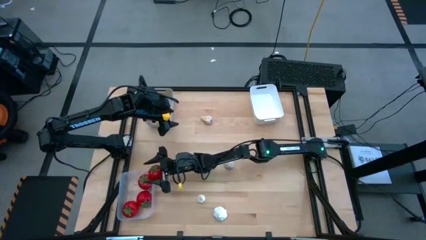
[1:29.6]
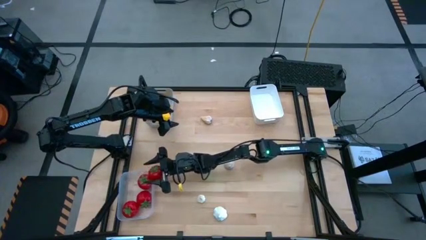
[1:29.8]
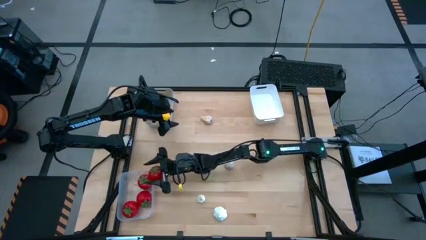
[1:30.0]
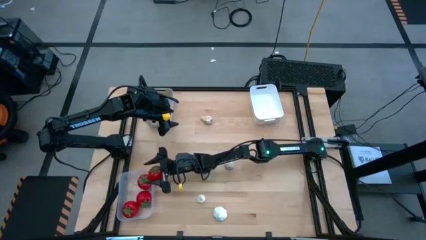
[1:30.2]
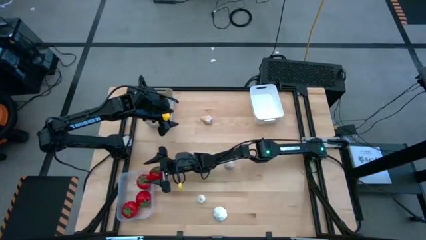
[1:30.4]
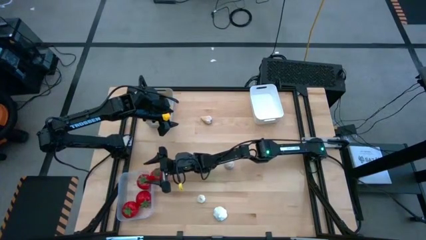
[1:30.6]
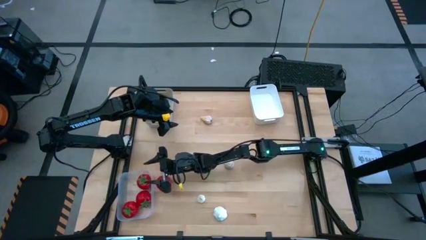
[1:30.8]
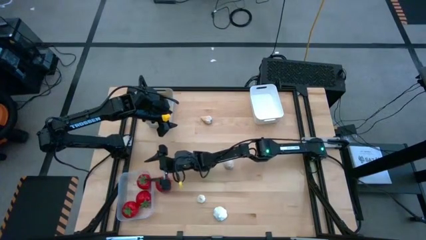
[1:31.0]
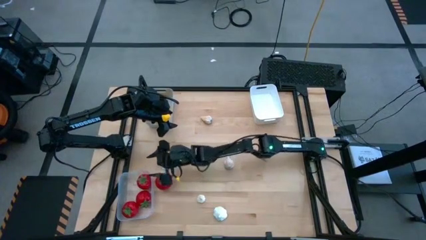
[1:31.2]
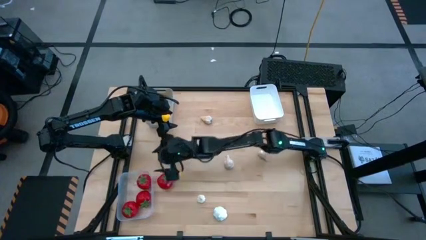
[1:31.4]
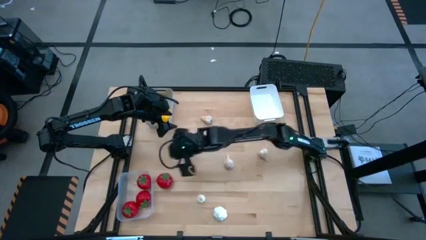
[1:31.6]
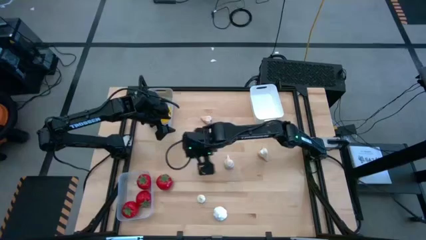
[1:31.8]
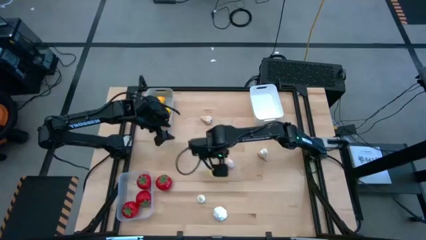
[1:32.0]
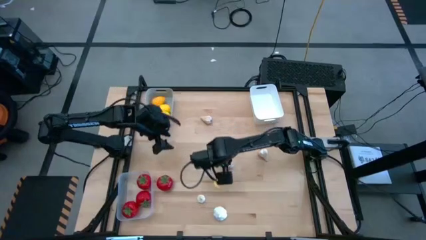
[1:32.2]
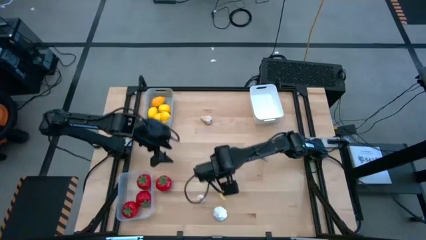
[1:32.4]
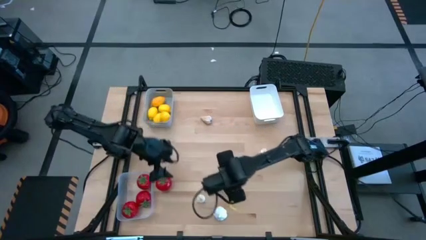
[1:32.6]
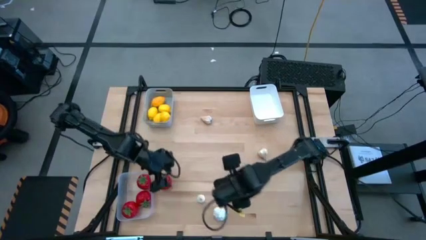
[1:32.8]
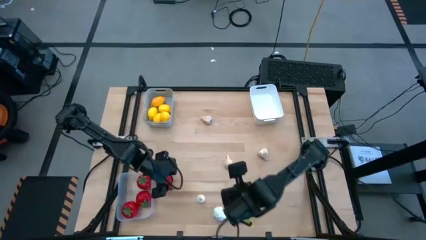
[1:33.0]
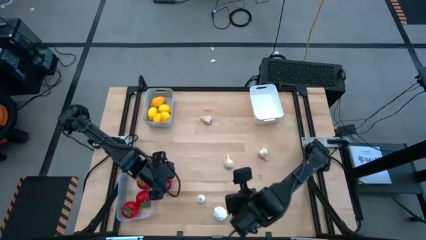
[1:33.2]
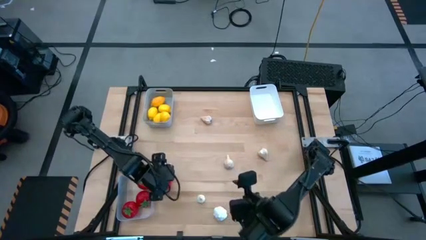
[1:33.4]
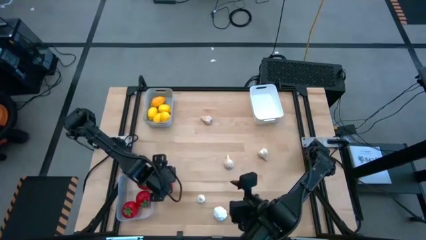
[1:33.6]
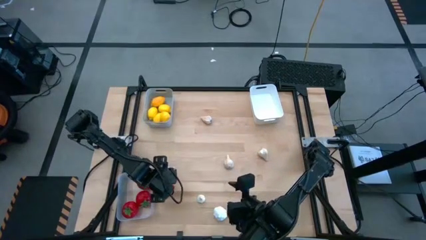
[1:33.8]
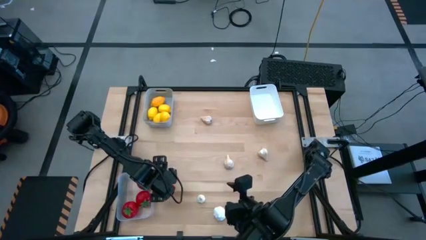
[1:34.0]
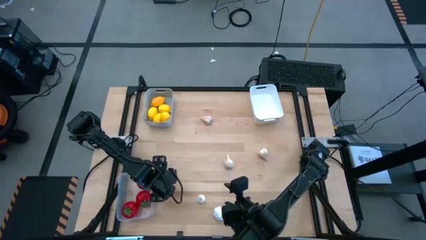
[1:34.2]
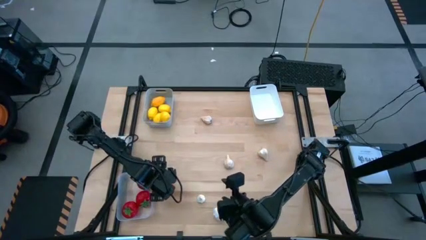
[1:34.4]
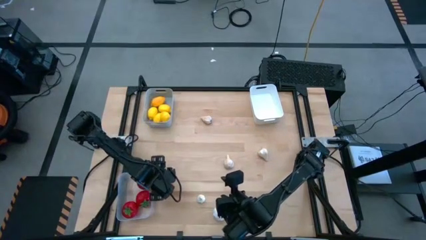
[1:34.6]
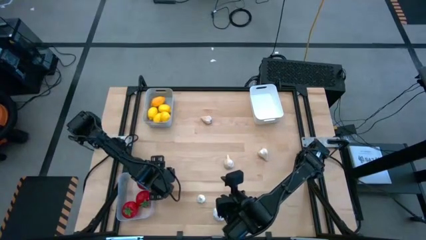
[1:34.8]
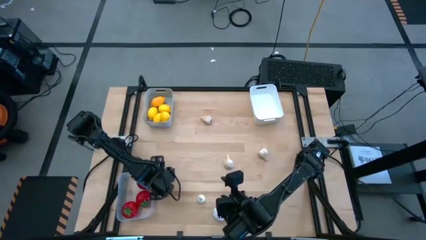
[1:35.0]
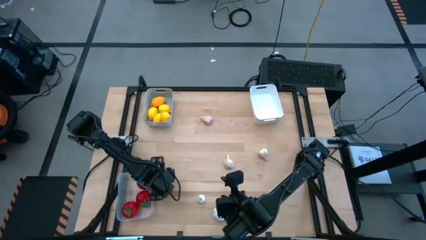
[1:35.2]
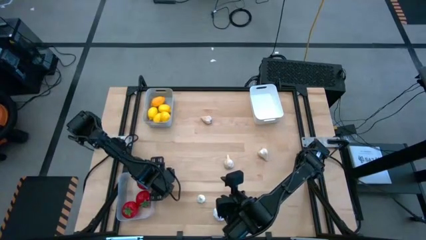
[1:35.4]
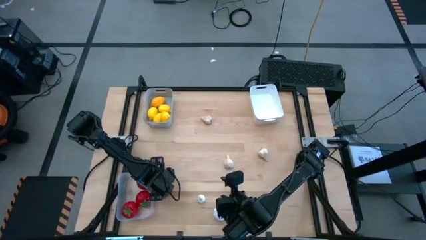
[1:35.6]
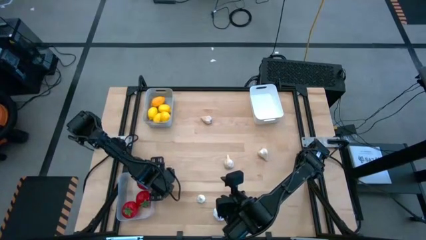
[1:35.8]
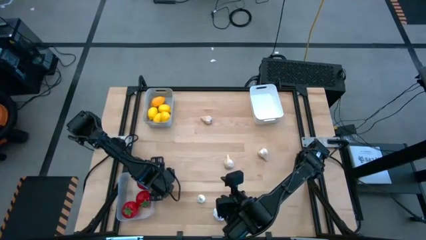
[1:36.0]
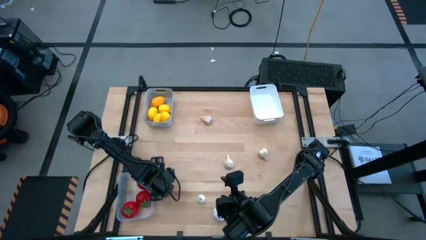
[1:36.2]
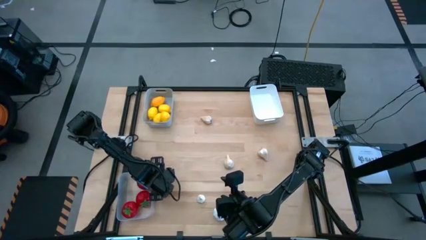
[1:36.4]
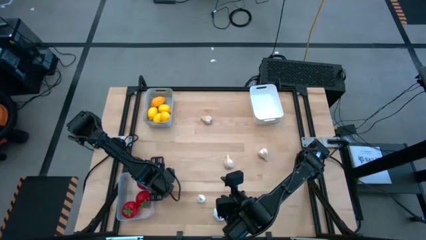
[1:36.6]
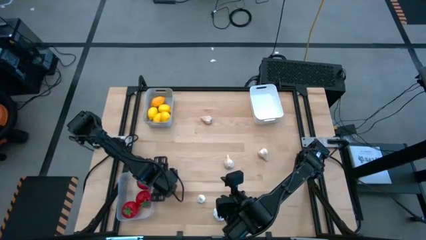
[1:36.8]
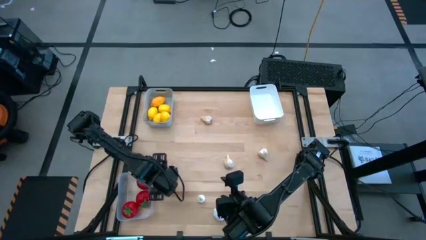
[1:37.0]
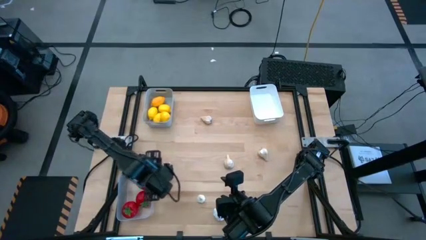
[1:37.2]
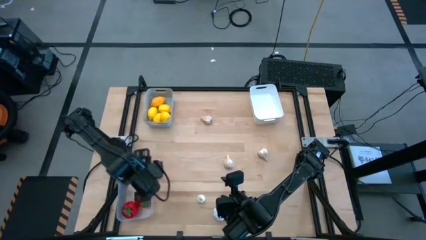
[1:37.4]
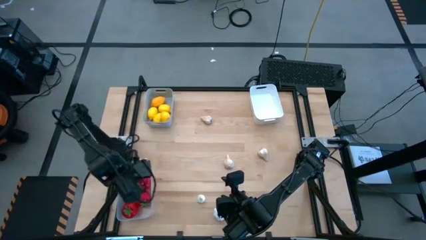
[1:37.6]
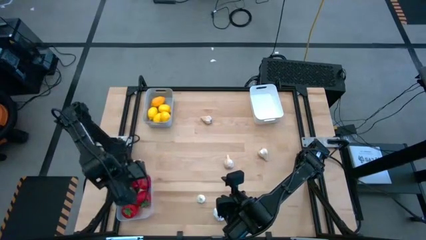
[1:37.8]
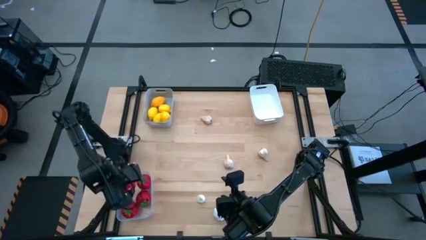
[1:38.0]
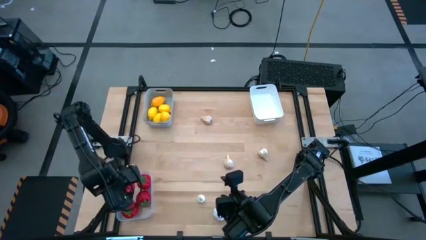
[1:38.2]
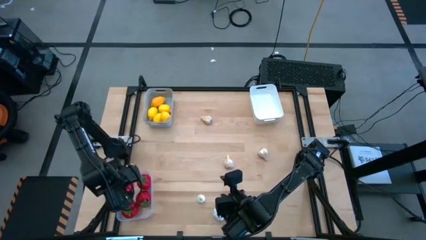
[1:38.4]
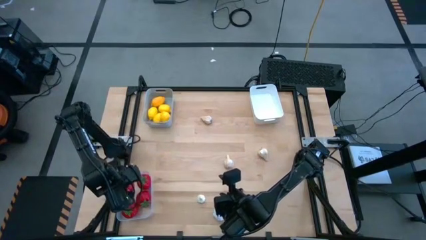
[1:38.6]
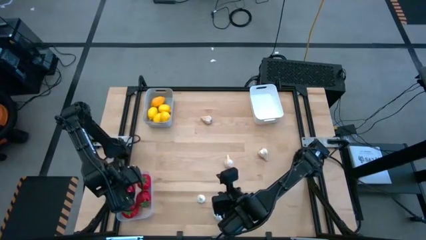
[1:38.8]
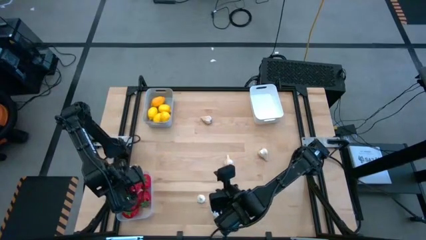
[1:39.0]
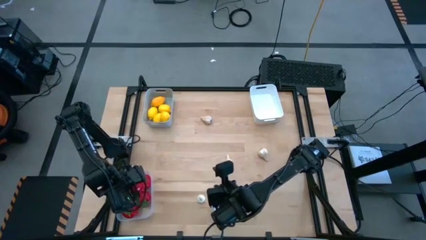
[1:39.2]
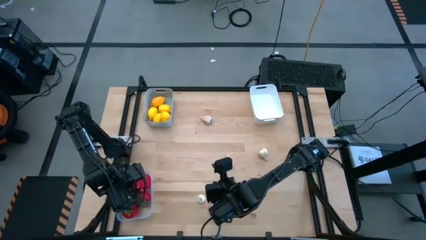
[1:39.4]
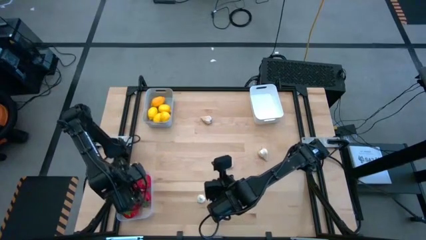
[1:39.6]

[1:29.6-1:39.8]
Task: Sort produce into baskets
Put the red tomato into the transparent bin

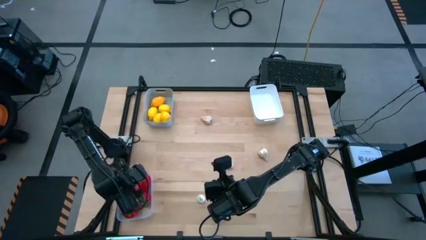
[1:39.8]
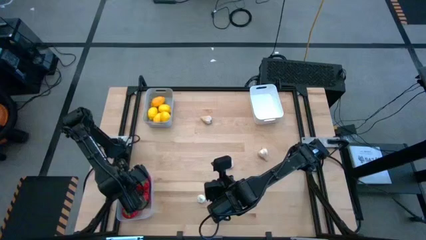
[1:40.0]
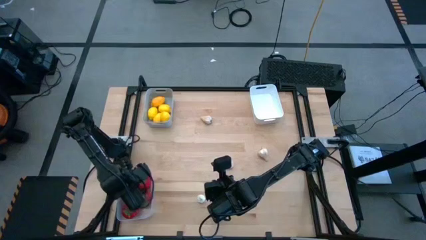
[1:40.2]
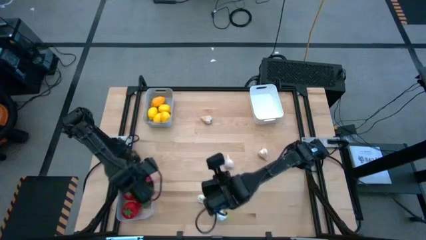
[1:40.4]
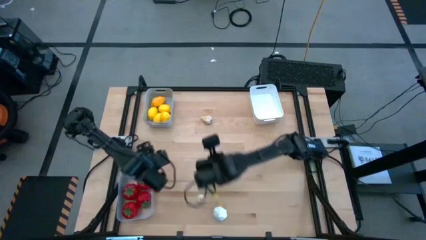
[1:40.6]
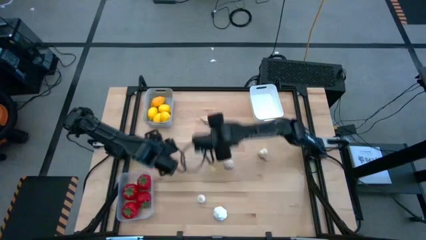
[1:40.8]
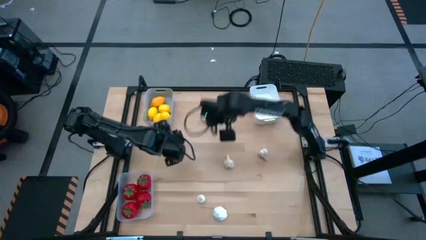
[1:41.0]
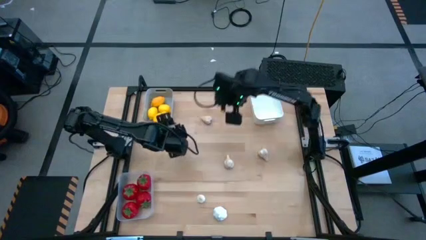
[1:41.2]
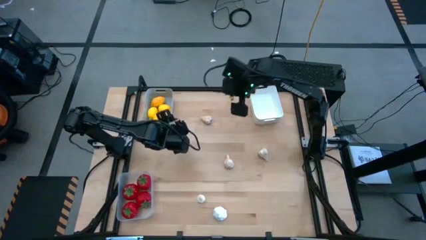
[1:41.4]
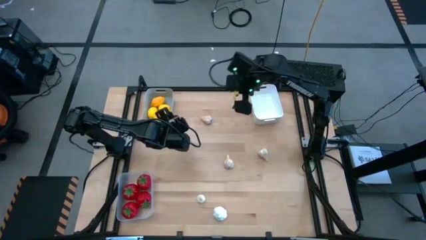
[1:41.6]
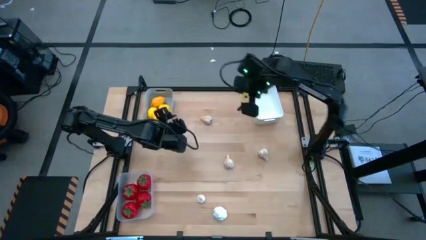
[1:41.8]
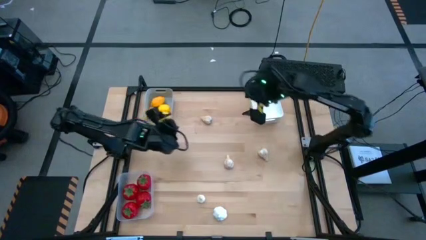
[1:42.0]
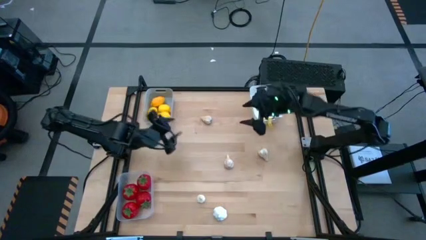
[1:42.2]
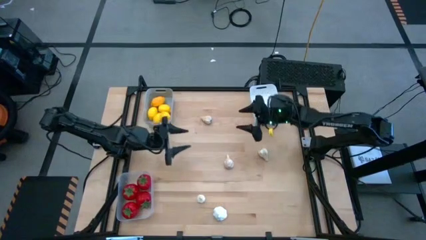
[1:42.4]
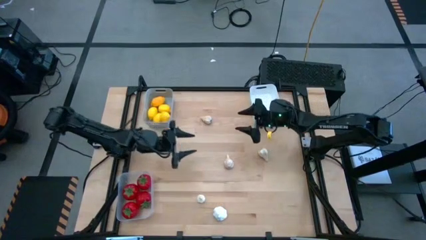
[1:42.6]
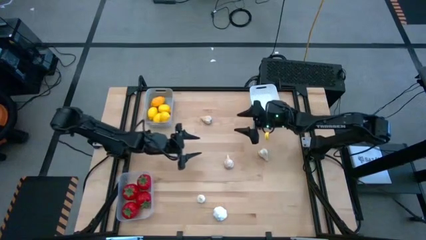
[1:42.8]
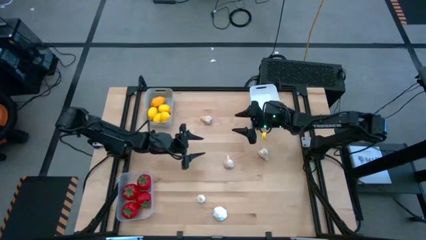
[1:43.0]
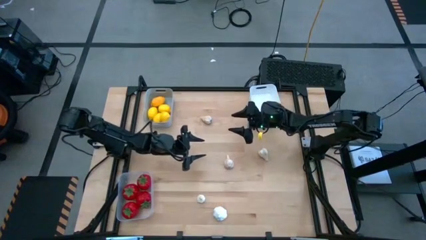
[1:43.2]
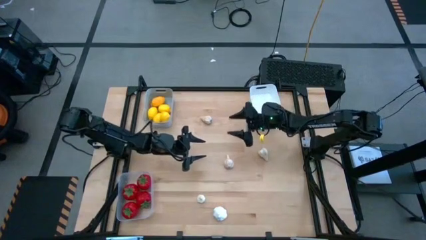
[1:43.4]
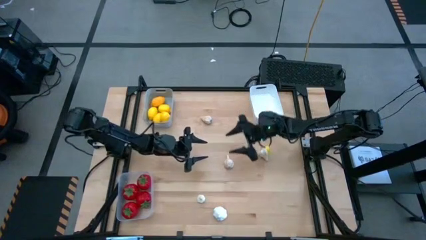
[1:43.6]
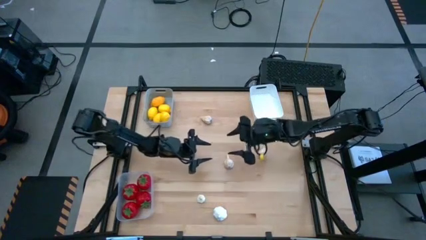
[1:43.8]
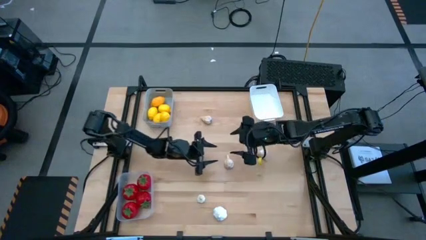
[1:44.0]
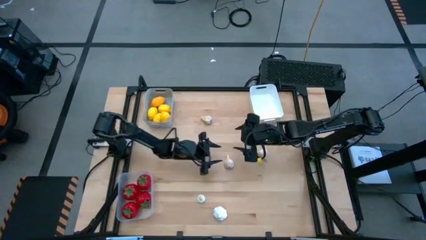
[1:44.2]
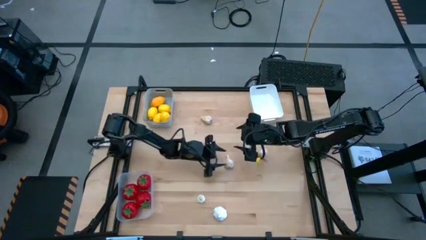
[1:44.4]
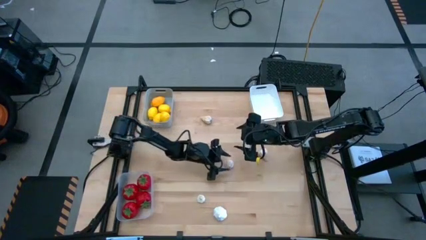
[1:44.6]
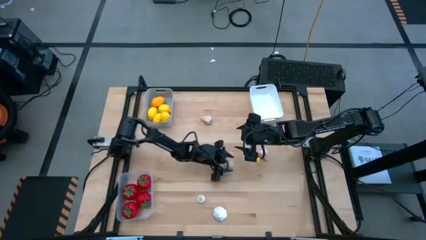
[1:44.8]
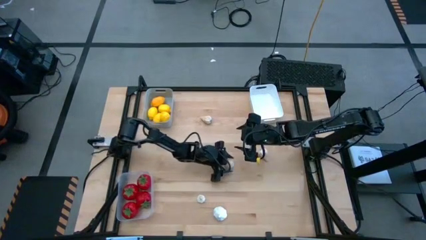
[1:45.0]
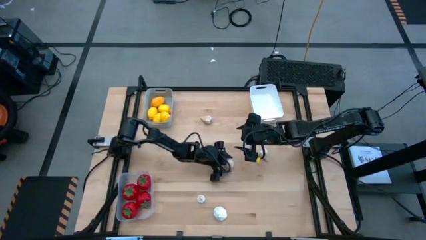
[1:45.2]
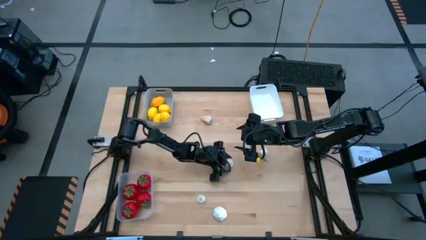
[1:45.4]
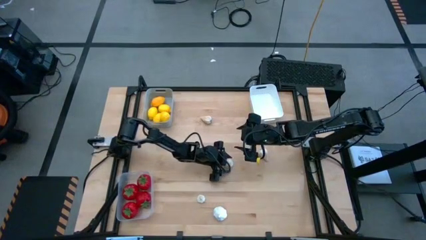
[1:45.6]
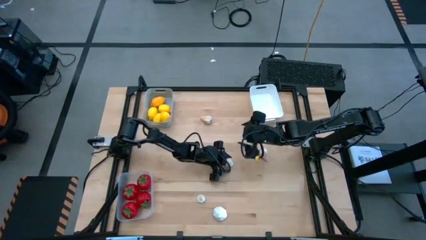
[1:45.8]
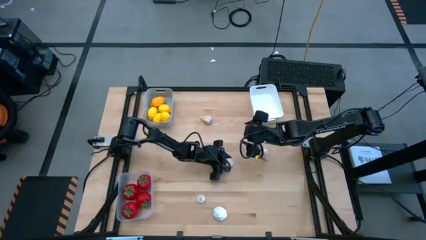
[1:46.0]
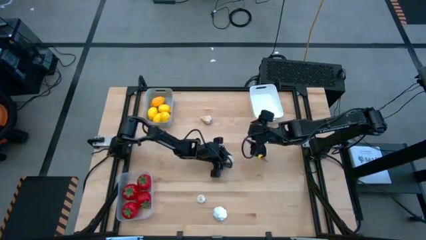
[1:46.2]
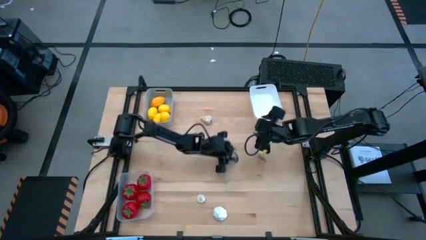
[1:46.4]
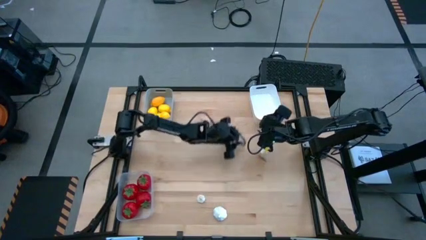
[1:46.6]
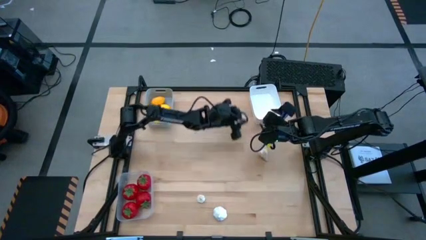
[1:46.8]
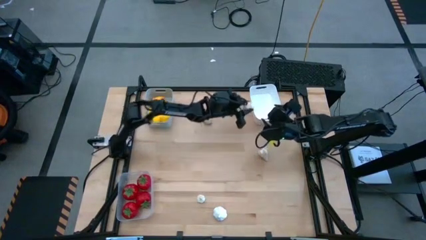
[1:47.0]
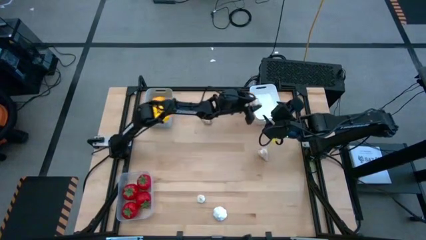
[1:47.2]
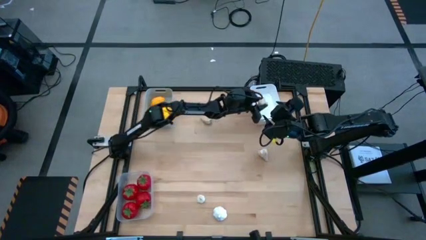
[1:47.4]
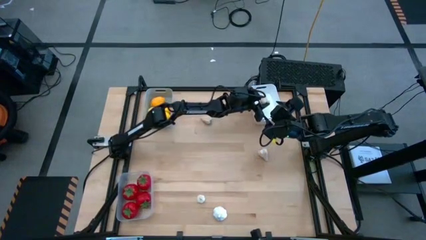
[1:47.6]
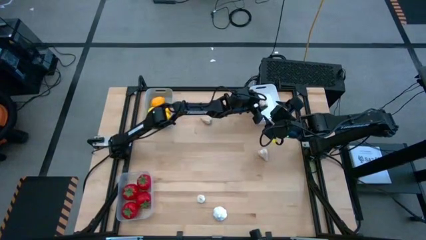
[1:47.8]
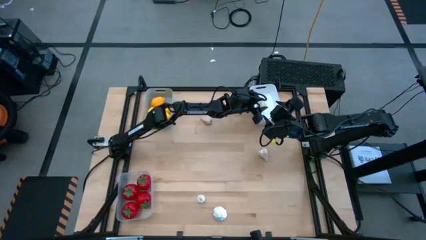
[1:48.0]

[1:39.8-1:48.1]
Put the white garlic into the white bin
